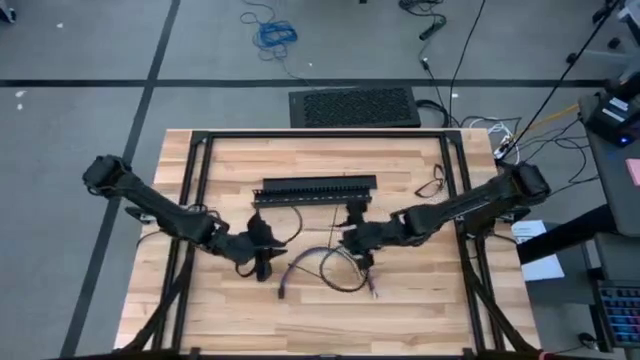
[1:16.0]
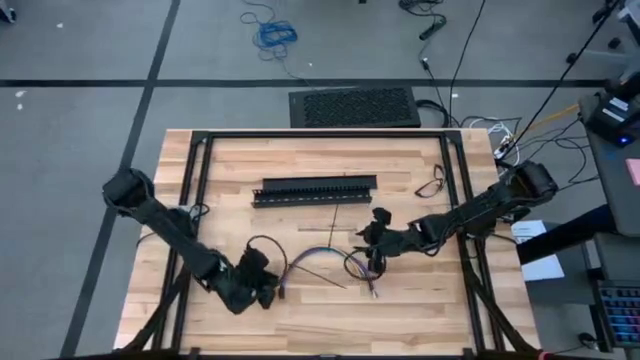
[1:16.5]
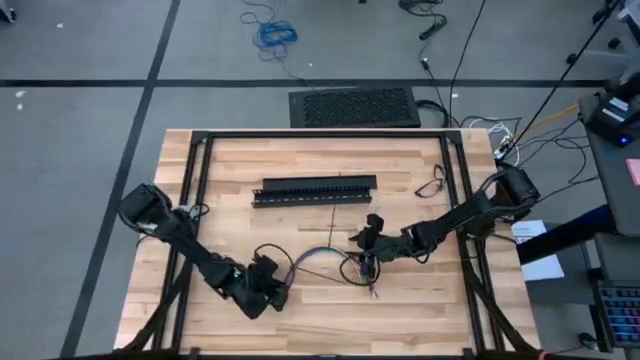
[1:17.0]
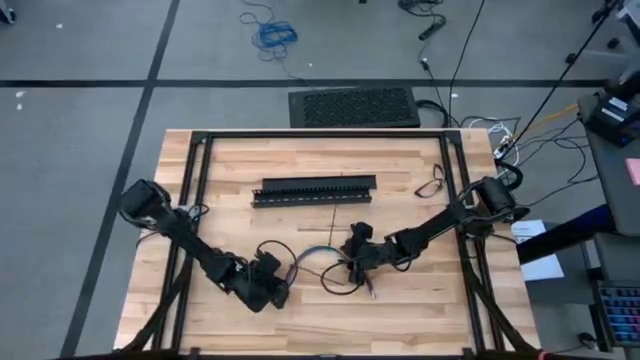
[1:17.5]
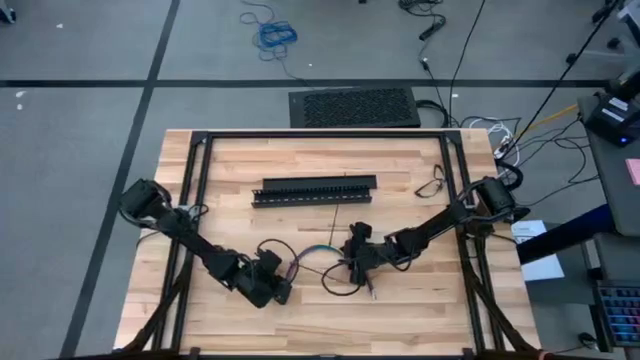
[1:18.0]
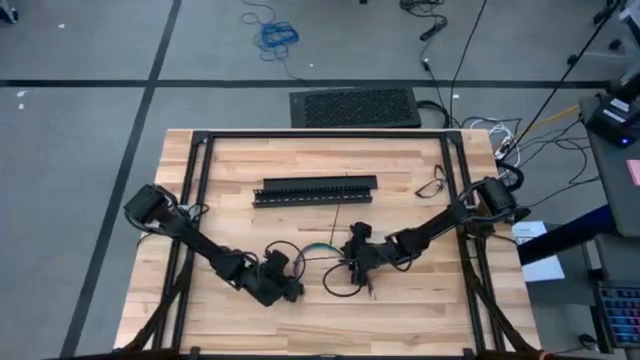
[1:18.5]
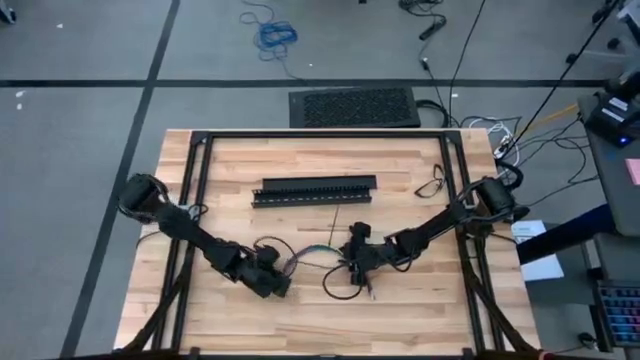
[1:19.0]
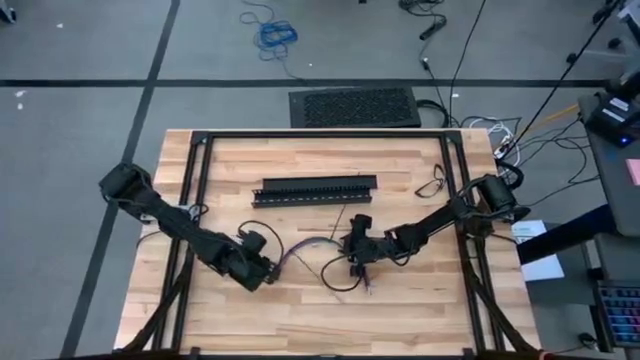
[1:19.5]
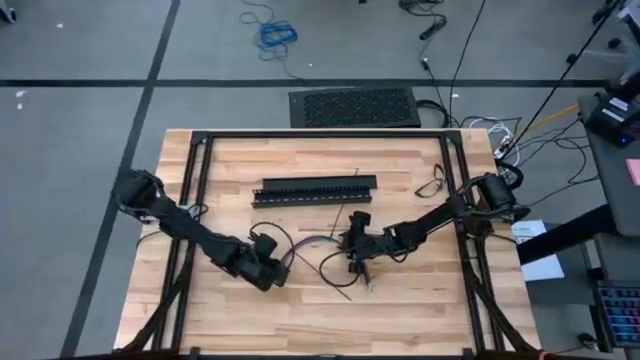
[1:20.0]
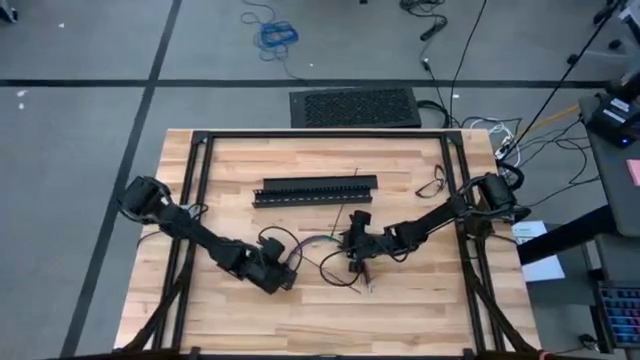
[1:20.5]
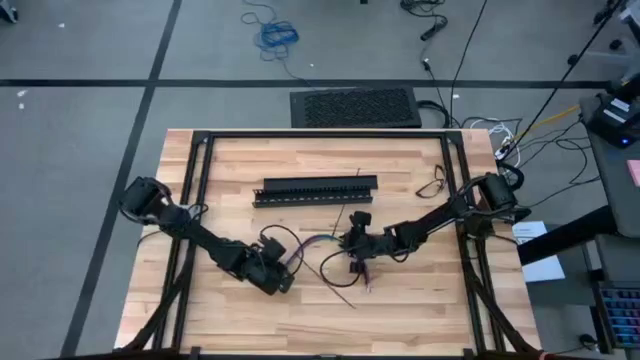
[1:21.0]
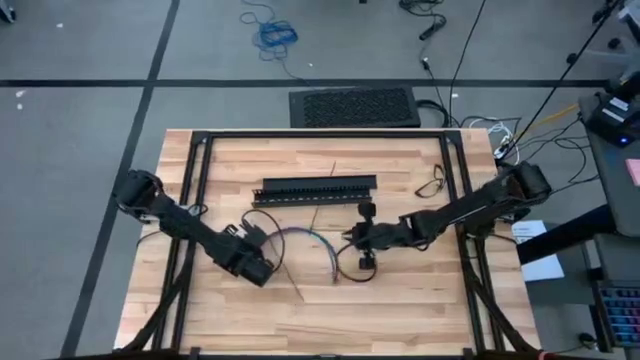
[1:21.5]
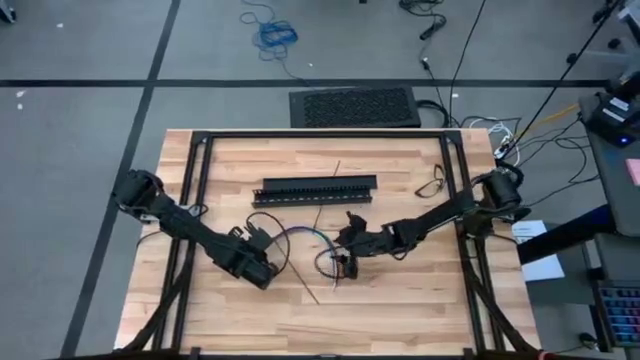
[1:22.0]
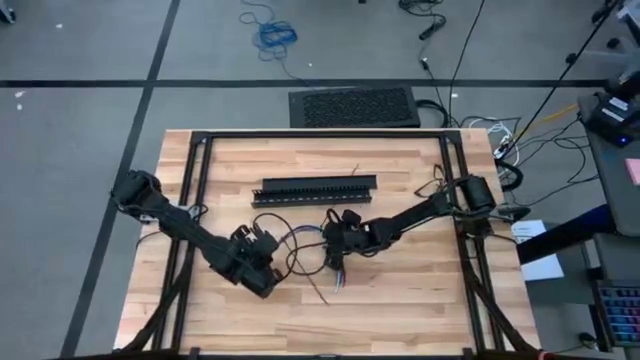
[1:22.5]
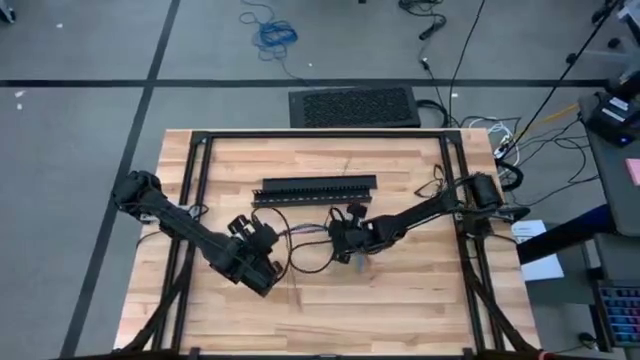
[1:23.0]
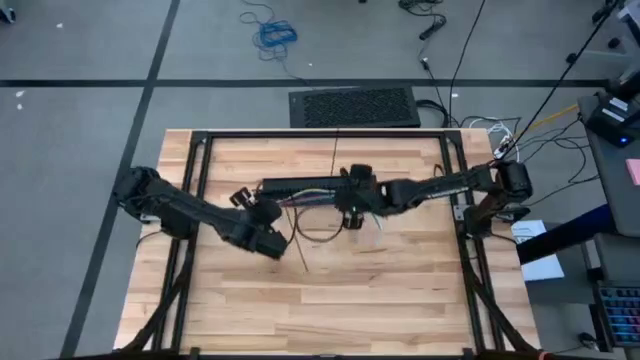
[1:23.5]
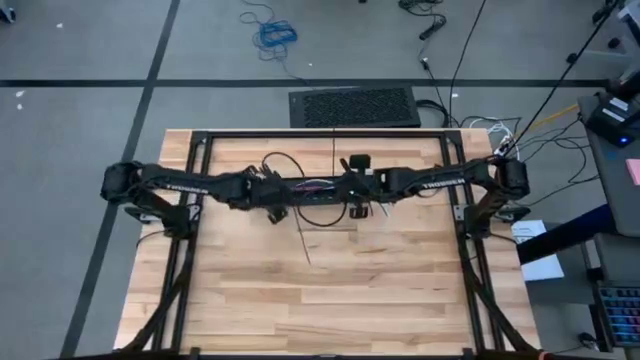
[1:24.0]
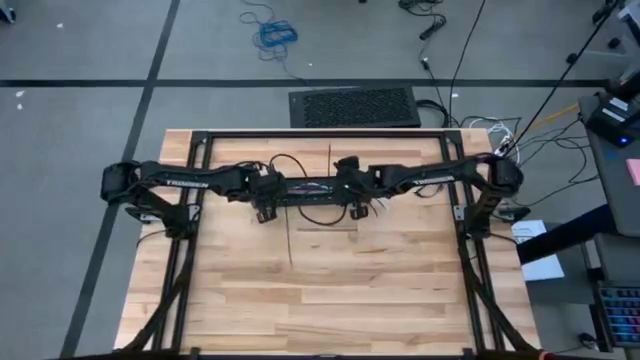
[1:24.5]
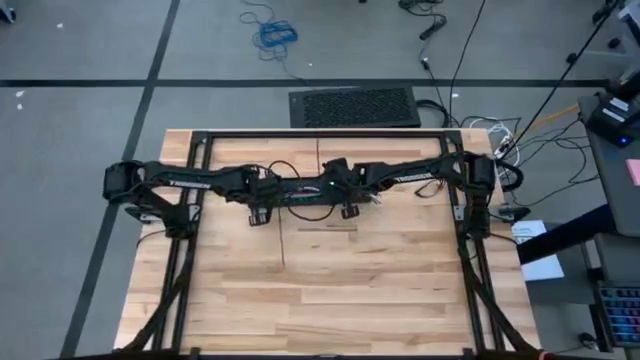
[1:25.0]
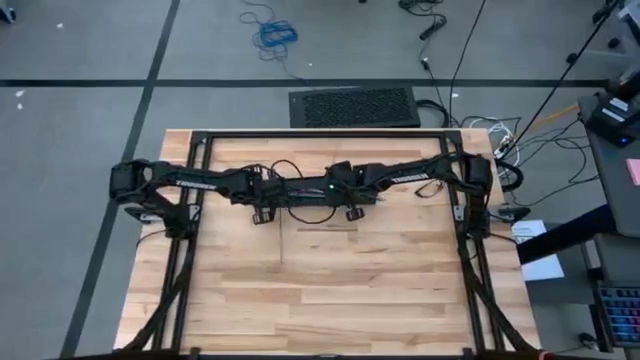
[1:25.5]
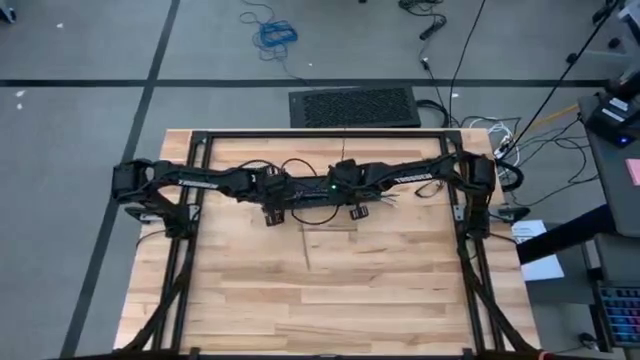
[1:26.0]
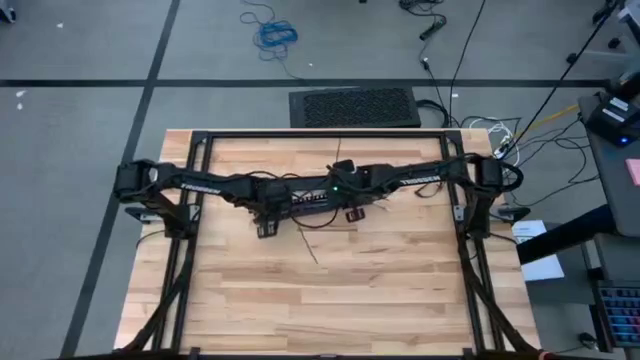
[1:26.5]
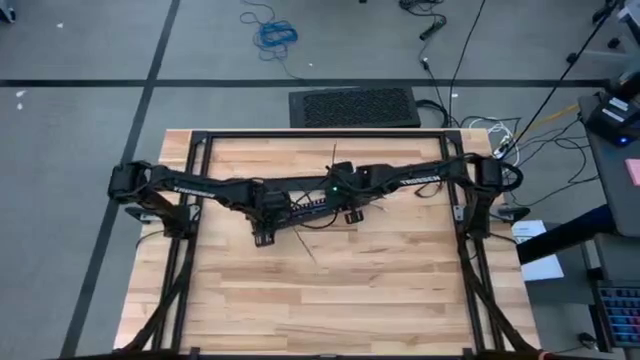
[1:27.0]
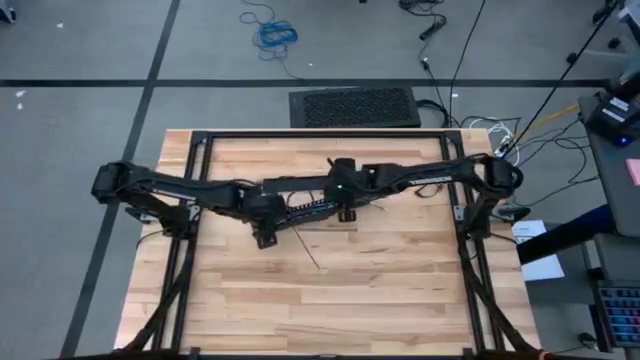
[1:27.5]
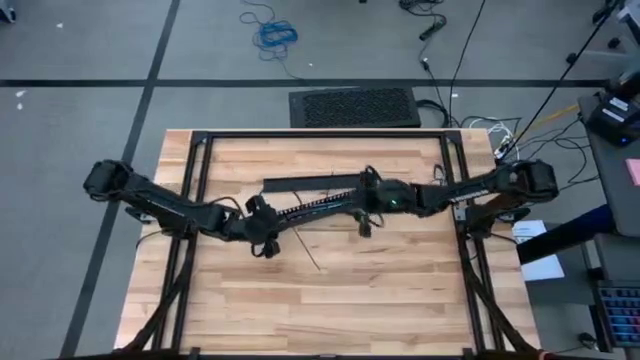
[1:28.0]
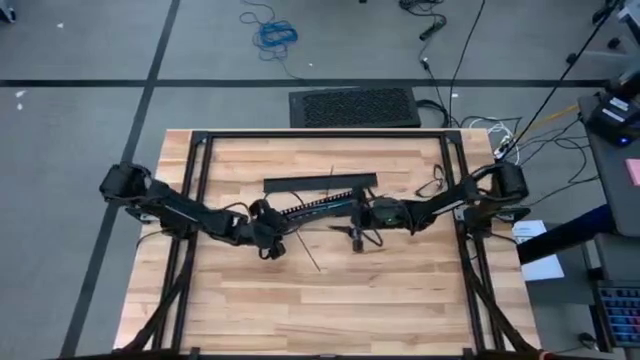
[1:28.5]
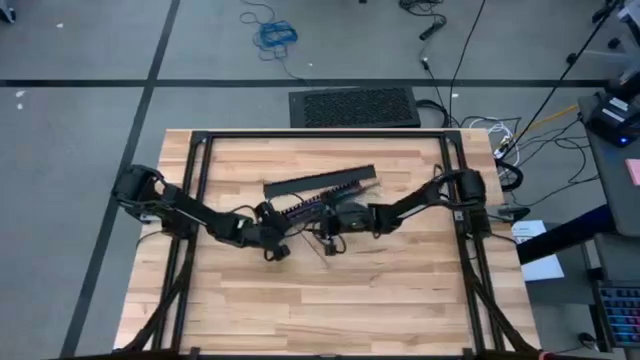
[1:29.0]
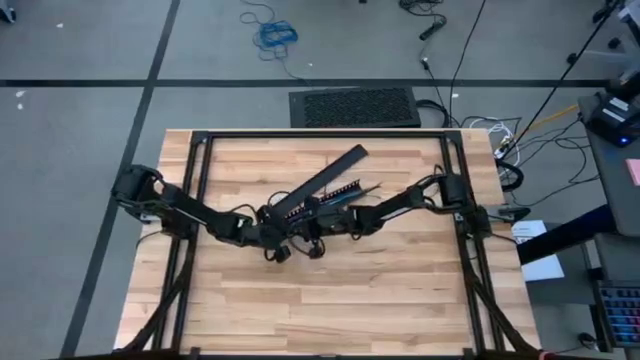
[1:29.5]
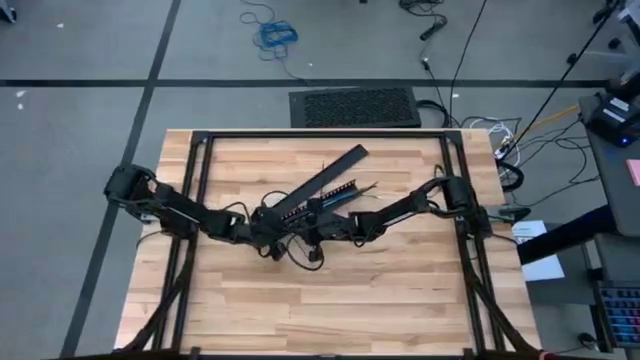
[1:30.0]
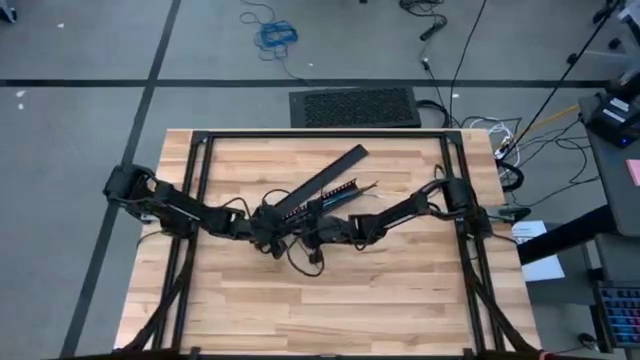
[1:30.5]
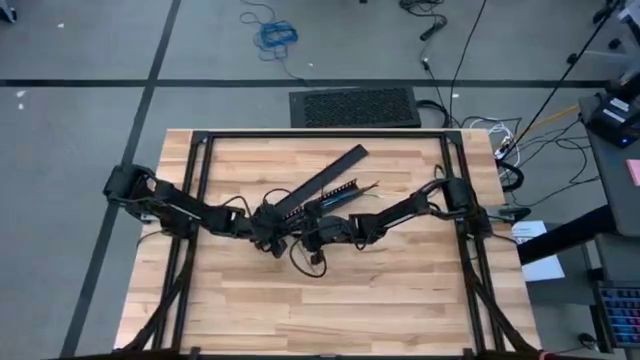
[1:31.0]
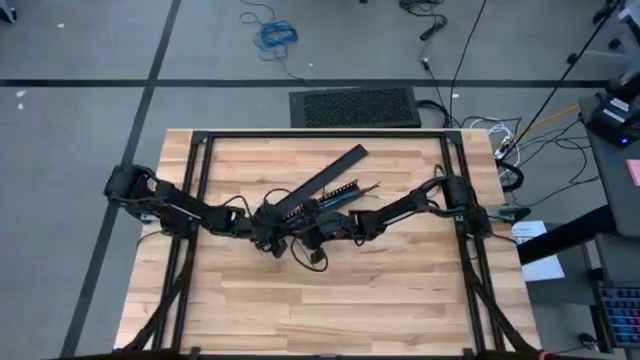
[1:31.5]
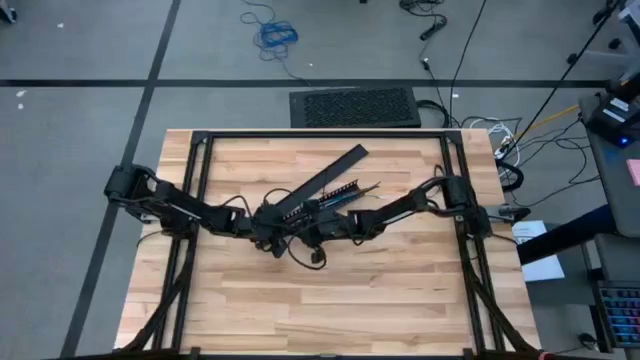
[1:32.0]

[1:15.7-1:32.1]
Task: Ziptie cables
Put the ziptied cables into a black cable duct

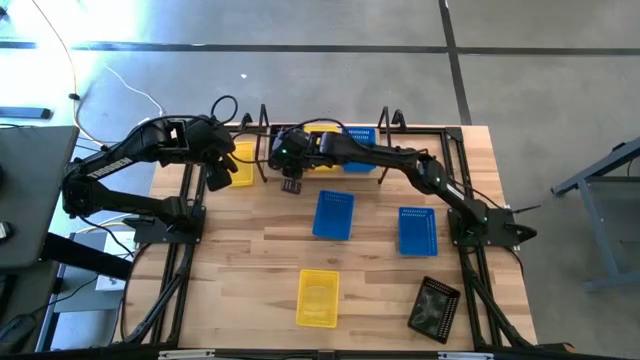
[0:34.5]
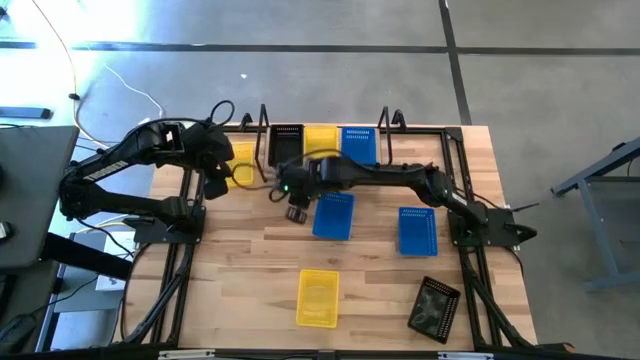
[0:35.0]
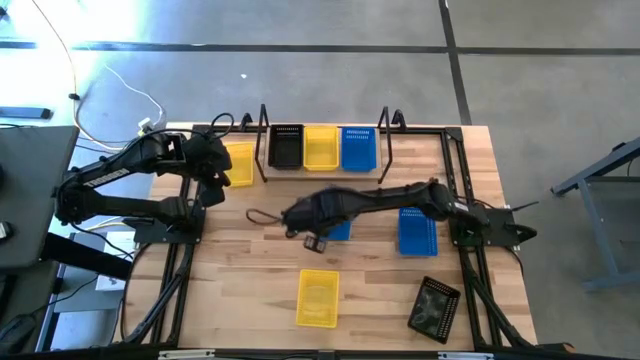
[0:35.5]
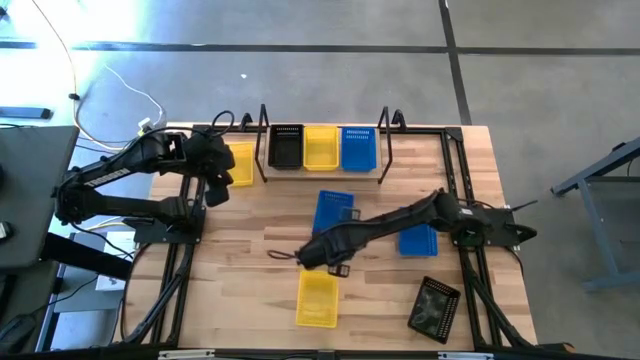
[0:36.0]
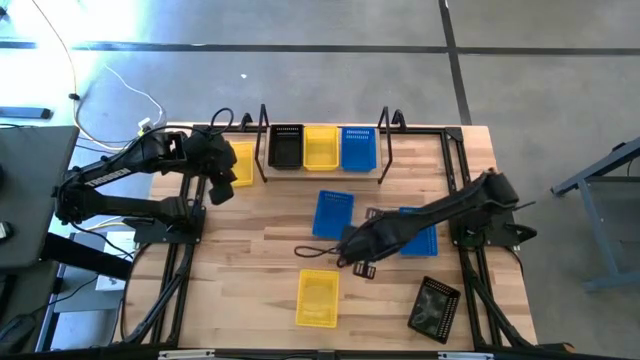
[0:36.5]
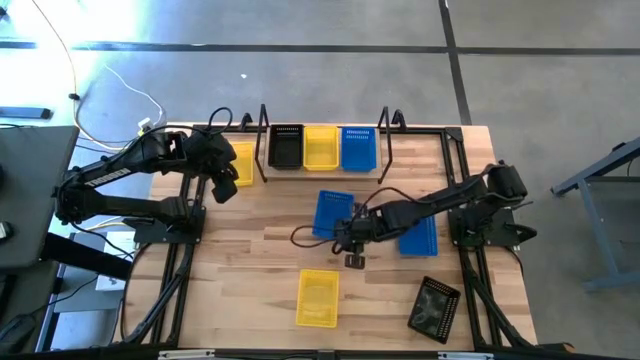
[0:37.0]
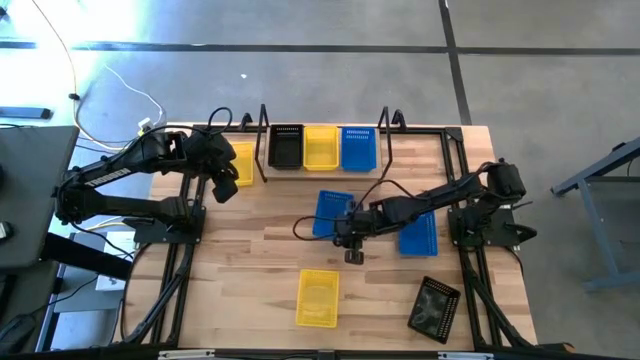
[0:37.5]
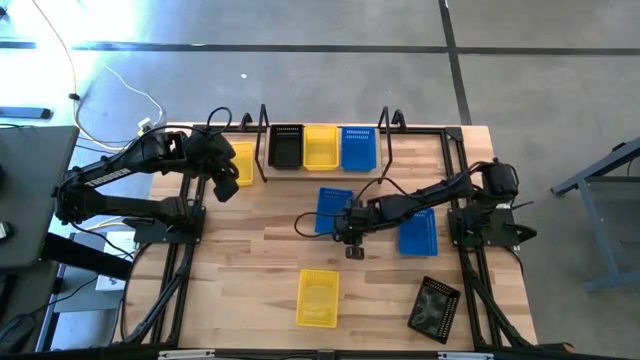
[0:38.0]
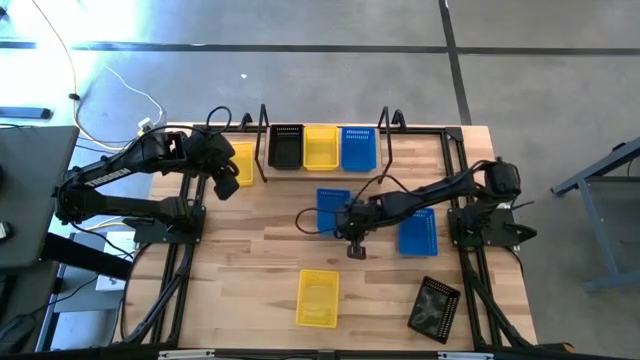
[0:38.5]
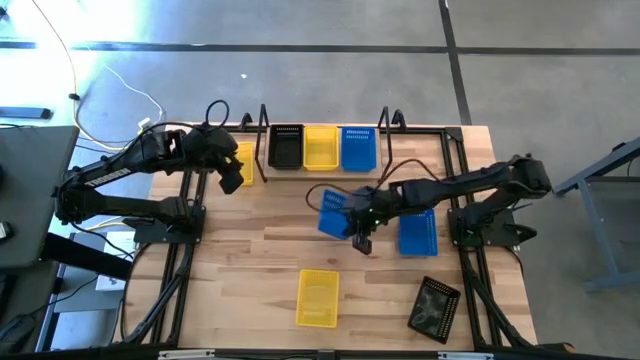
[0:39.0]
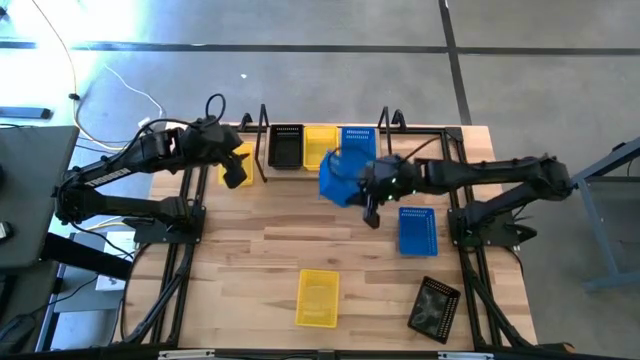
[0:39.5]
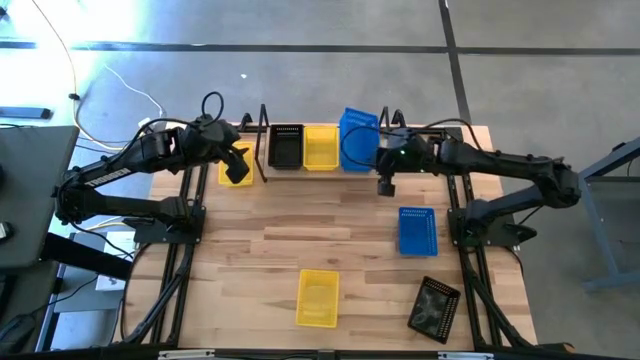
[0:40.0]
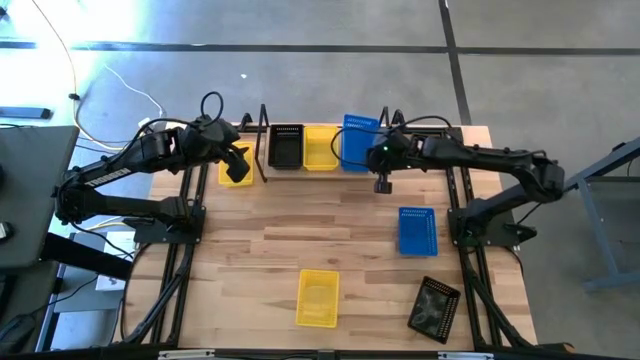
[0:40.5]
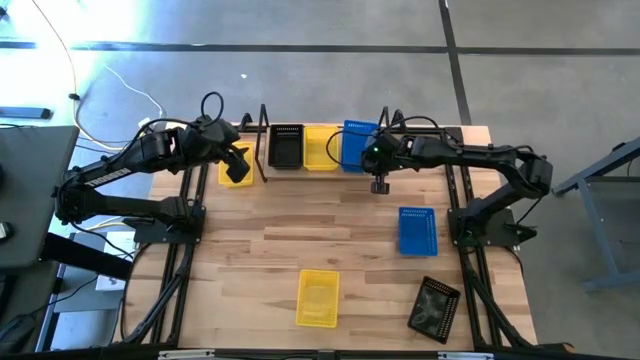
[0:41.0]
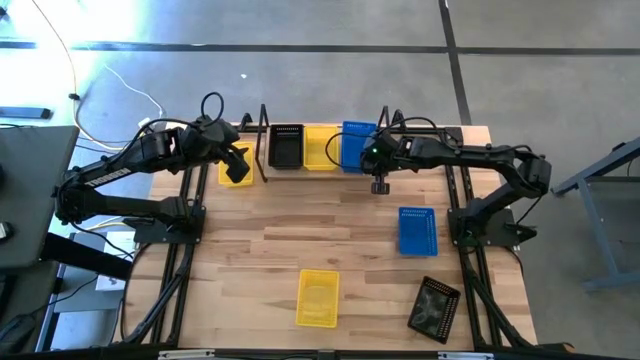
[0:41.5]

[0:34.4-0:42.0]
Task: Stack baskets on shelf by color
Stack the left blue bin on top of the blue bin on the shelf
